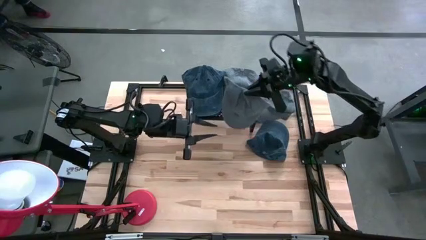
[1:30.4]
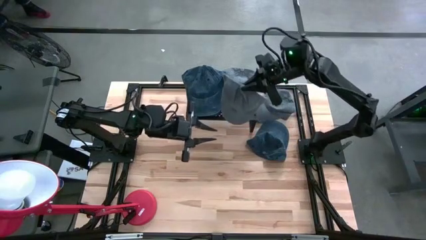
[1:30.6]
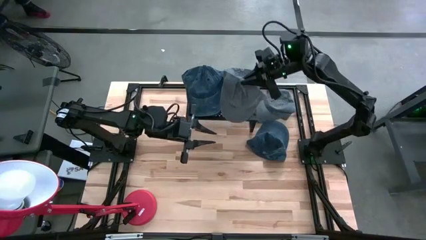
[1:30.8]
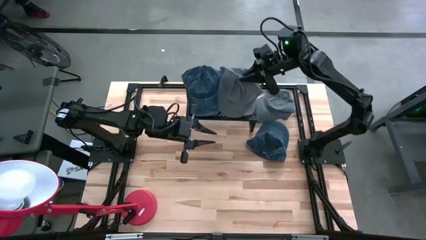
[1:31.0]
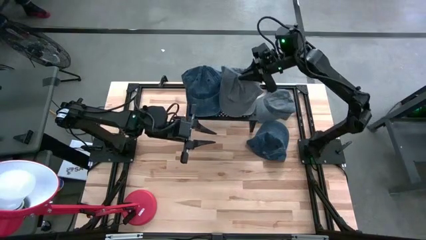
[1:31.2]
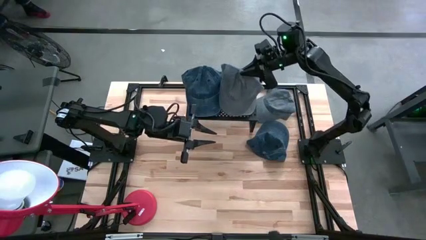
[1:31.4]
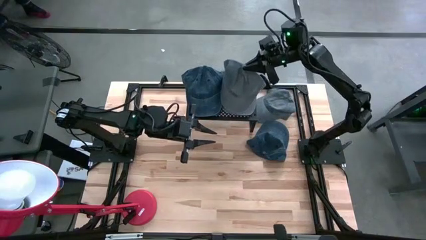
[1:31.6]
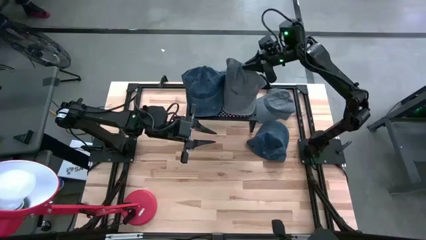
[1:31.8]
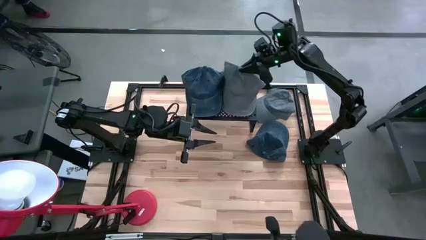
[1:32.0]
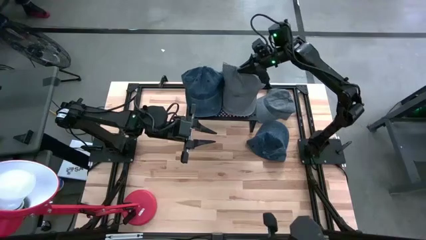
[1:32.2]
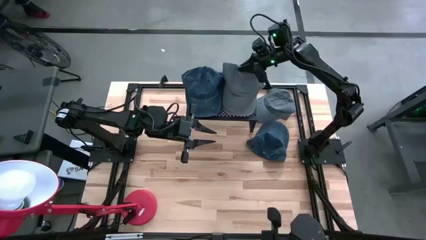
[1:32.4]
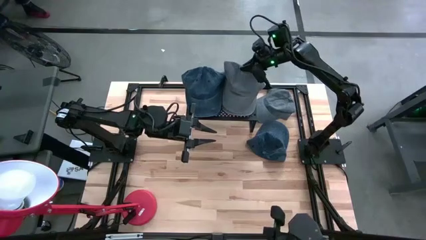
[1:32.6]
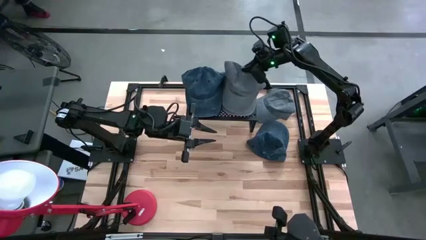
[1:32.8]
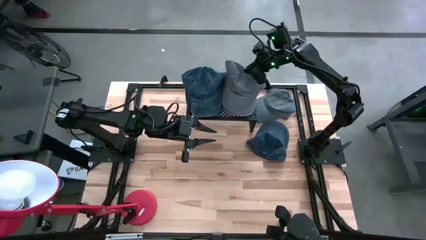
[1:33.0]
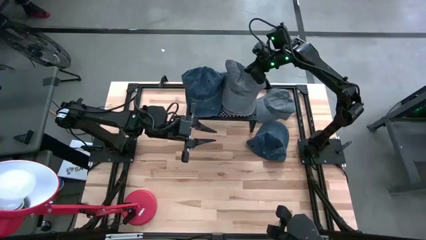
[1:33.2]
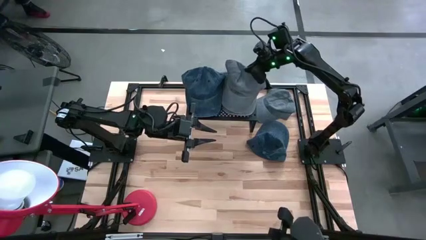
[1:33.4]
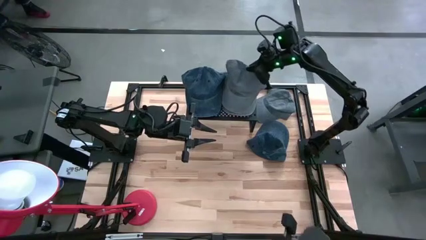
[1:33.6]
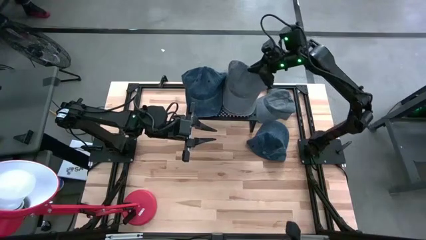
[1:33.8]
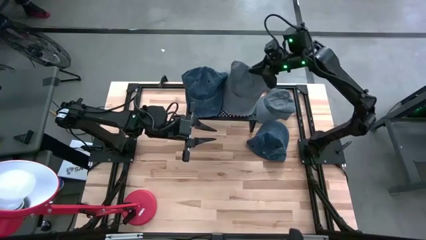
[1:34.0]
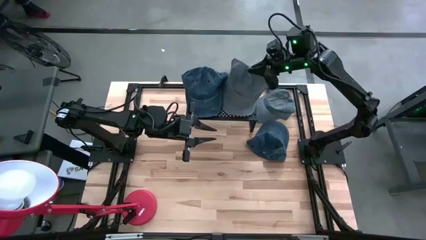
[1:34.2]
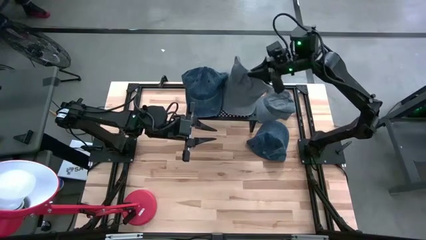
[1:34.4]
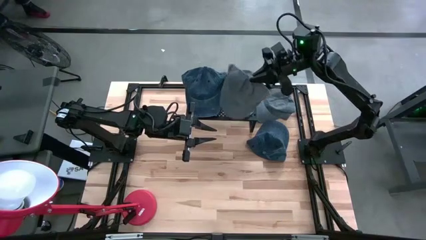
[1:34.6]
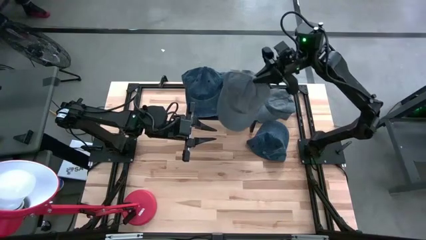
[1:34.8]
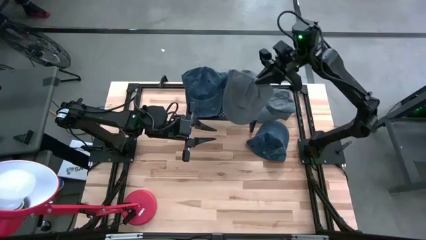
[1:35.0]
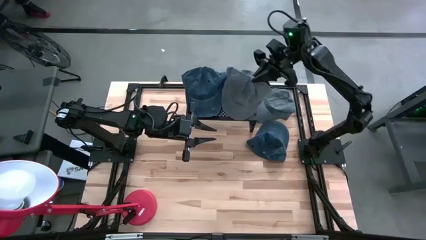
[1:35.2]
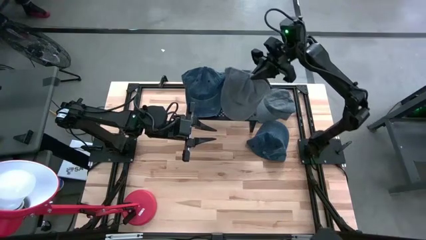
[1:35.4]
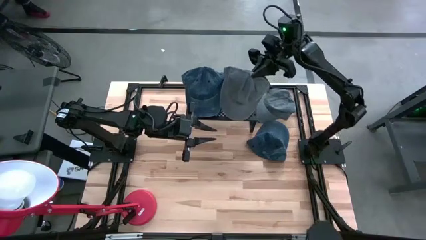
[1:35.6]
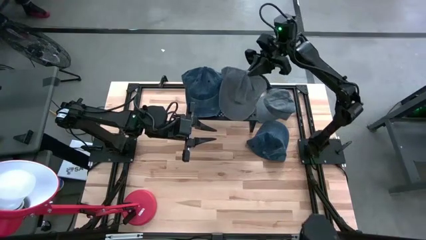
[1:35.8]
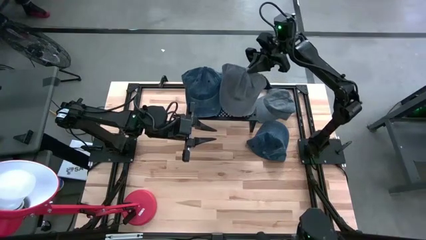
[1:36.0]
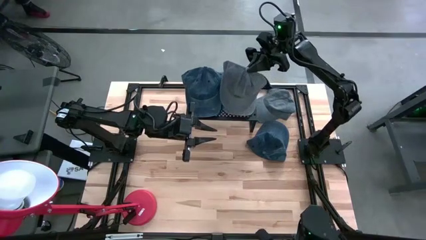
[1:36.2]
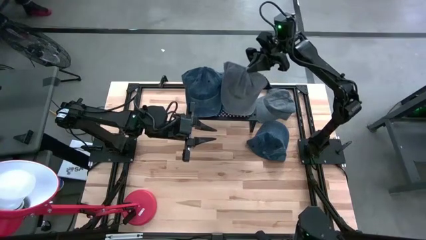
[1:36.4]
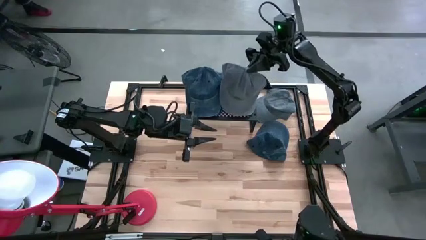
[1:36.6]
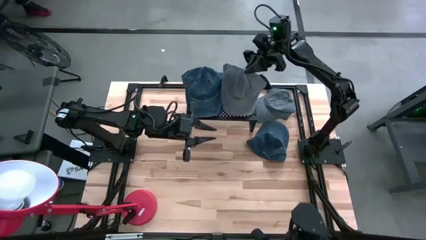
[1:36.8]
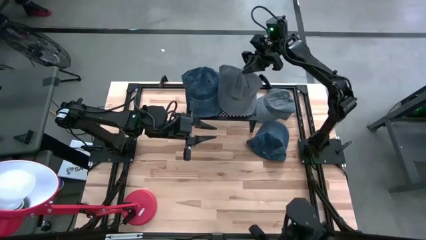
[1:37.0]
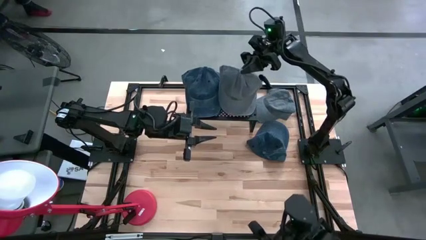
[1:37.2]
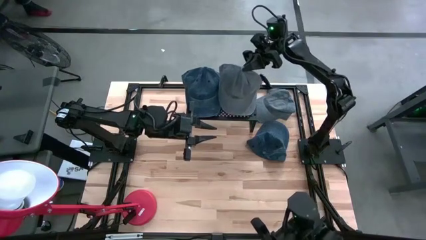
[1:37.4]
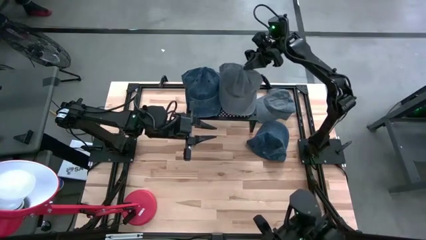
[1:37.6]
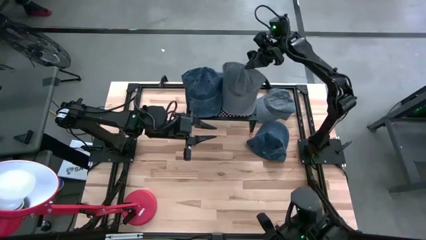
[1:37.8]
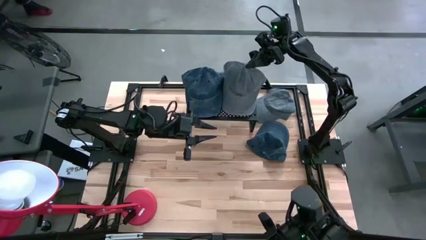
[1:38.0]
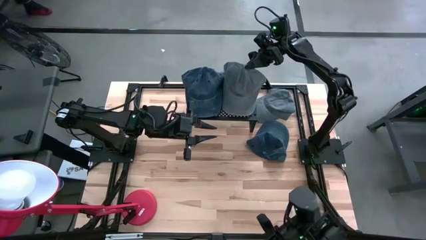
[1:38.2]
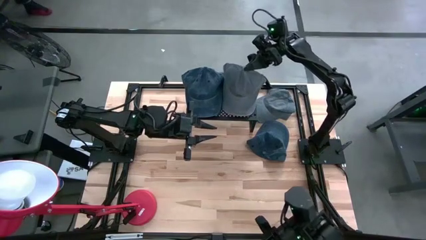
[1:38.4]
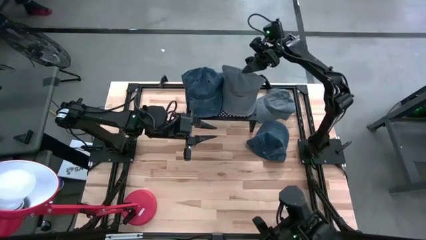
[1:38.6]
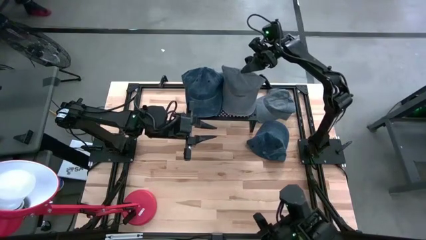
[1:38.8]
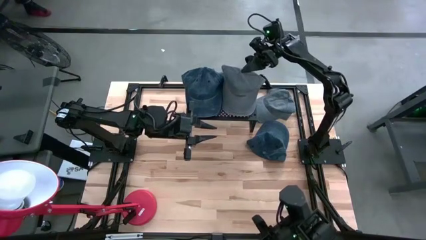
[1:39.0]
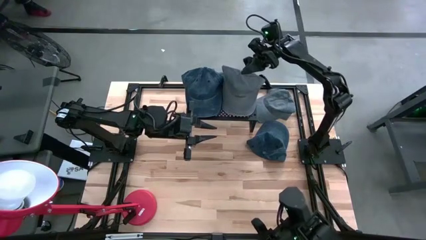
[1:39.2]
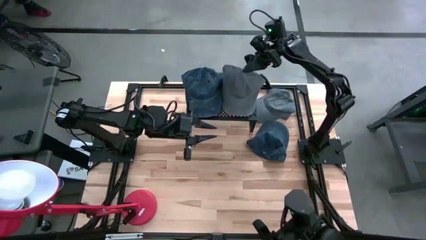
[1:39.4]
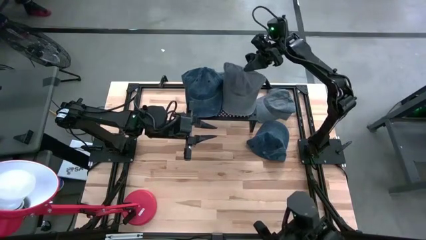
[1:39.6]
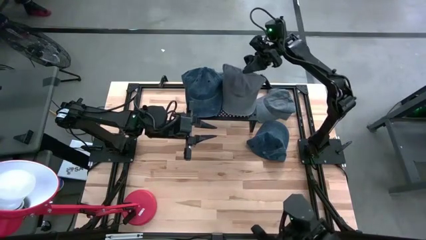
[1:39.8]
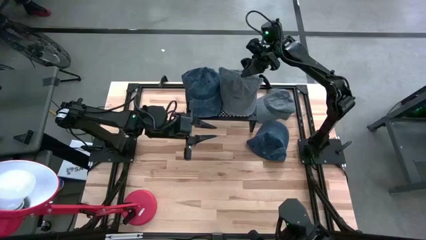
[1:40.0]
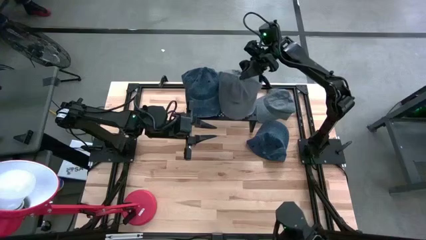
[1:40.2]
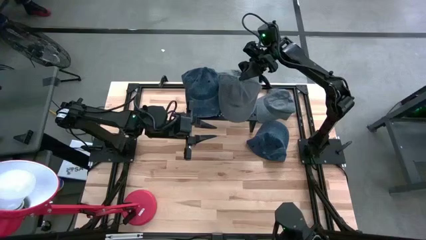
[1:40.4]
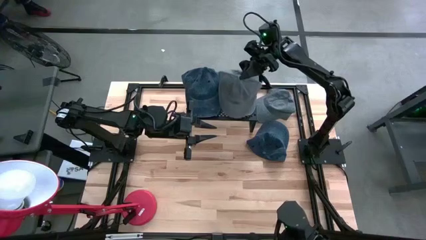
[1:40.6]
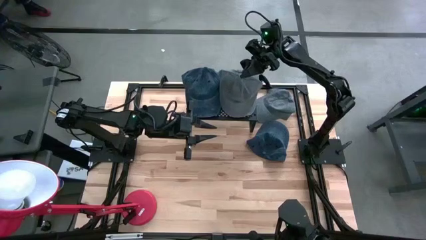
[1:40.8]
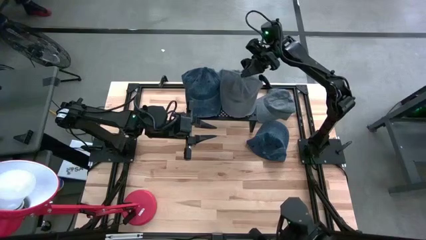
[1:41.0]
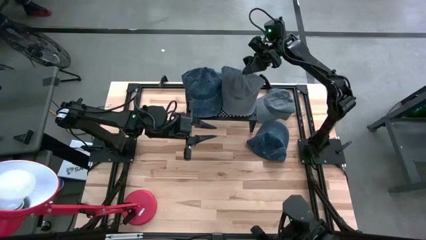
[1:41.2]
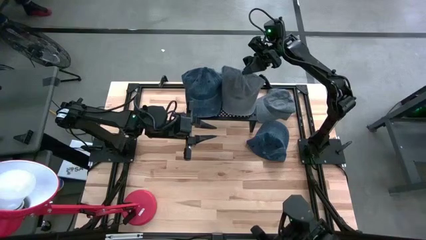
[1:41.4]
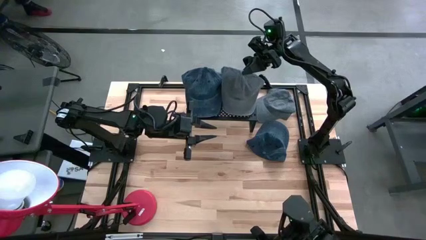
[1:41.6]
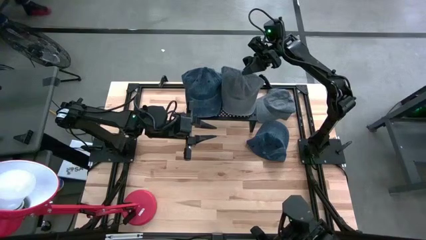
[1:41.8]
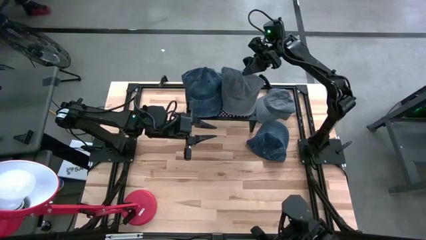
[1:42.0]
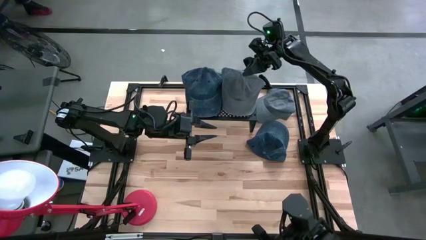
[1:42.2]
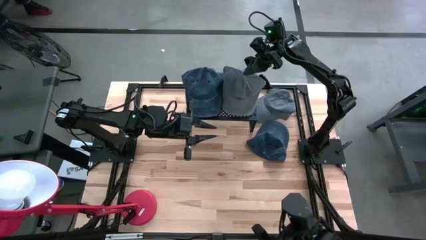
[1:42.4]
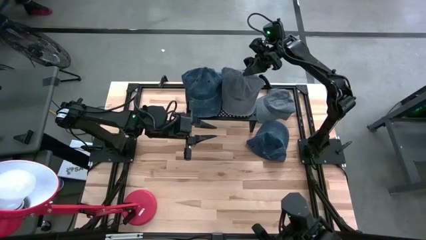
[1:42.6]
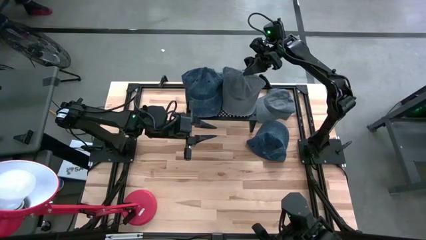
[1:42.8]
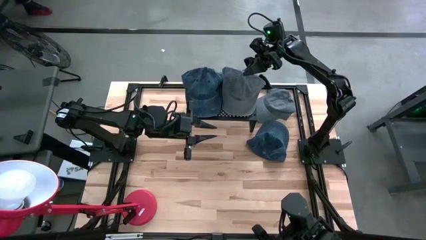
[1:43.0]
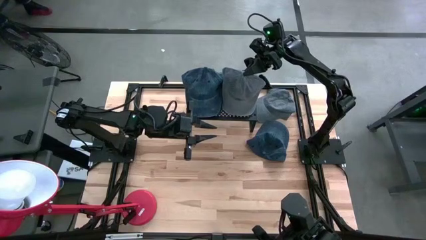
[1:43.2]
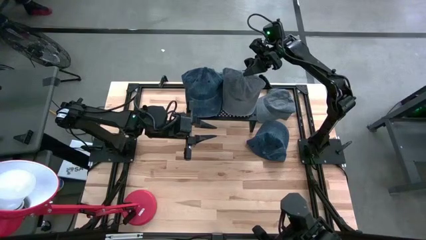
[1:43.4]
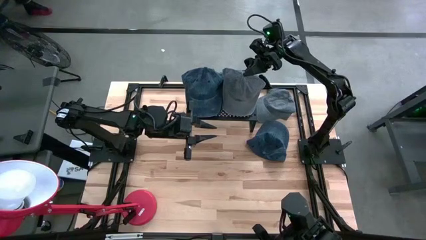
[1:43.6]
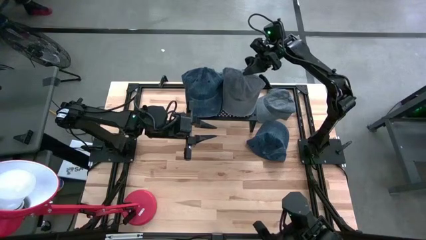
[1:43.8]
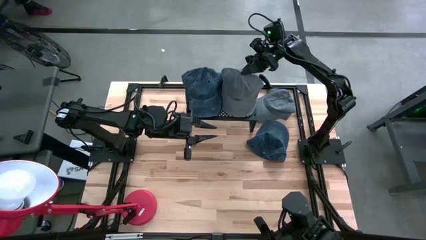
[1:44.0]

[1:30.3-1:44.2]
Task: Pick & Place hat
Stack the bottom gray cap on top of the gray cap on the shelf

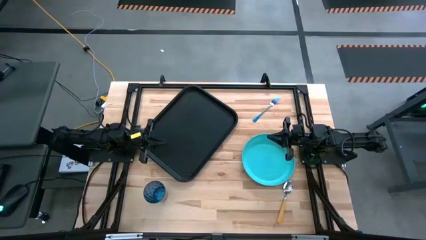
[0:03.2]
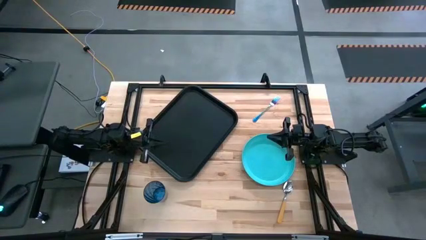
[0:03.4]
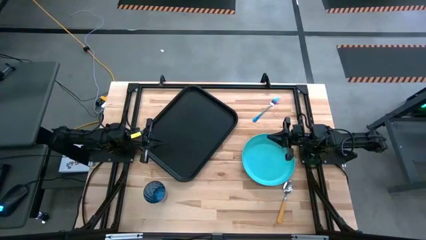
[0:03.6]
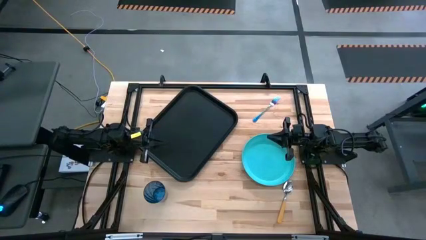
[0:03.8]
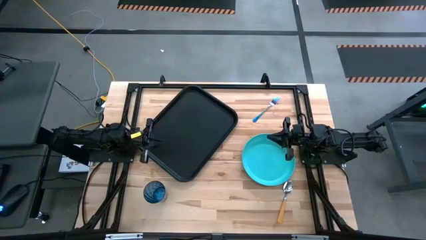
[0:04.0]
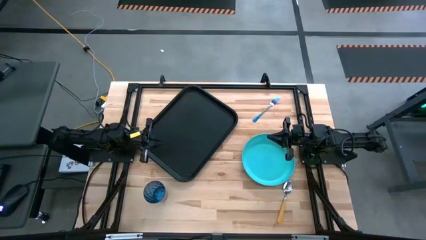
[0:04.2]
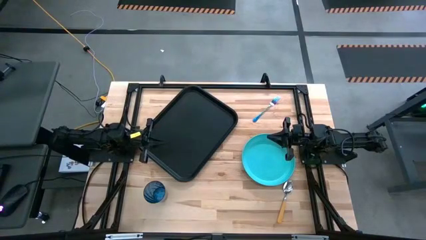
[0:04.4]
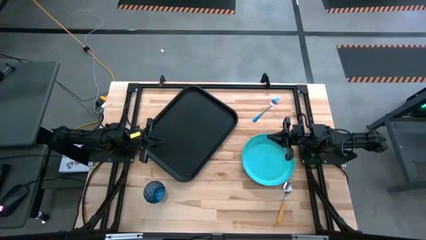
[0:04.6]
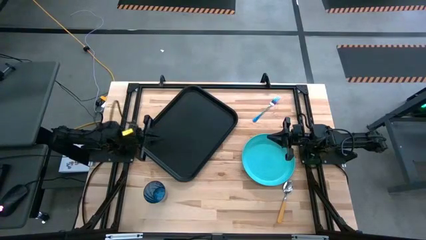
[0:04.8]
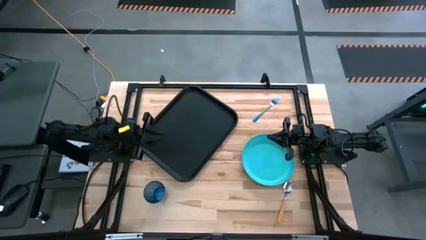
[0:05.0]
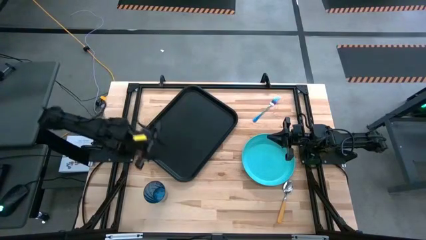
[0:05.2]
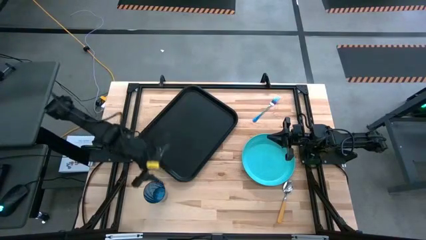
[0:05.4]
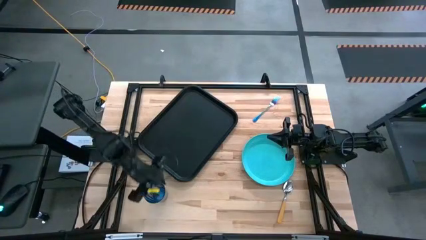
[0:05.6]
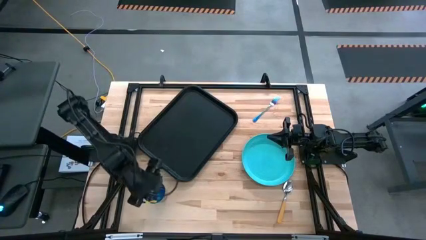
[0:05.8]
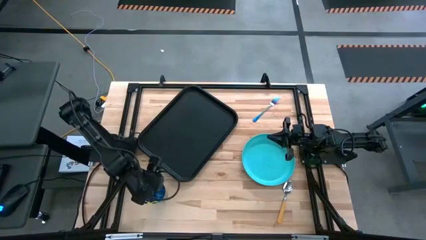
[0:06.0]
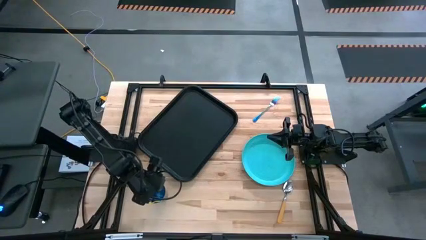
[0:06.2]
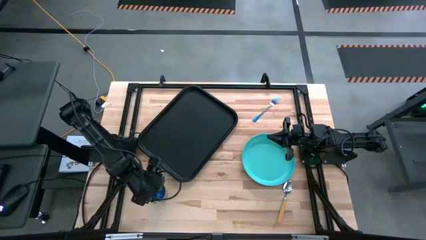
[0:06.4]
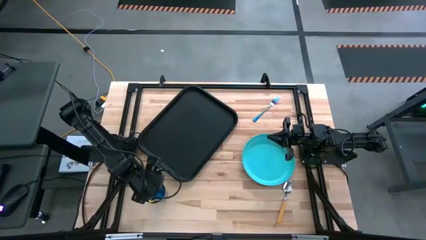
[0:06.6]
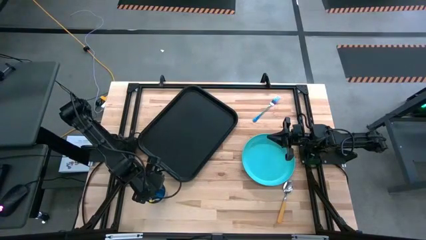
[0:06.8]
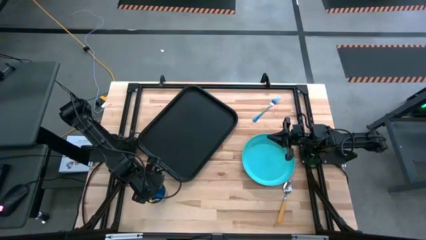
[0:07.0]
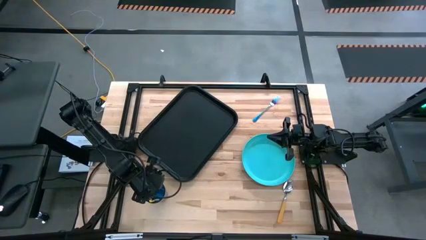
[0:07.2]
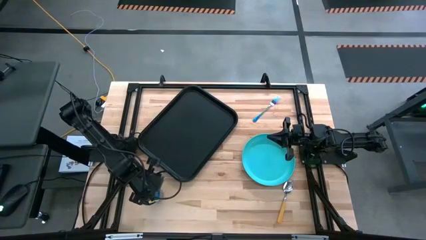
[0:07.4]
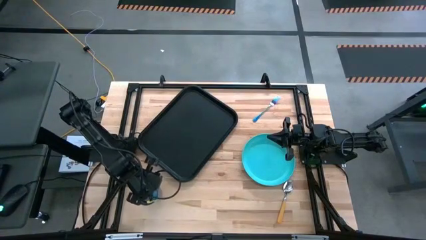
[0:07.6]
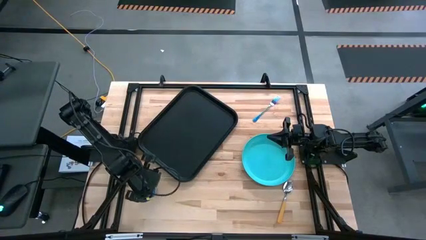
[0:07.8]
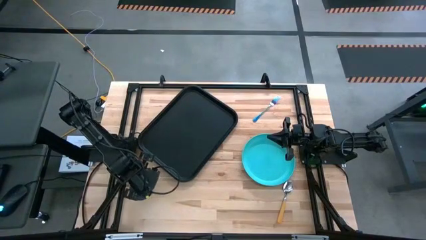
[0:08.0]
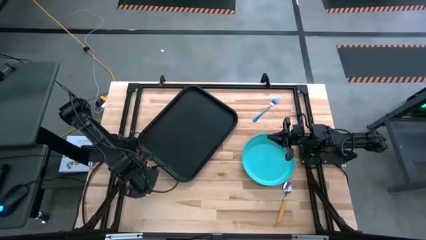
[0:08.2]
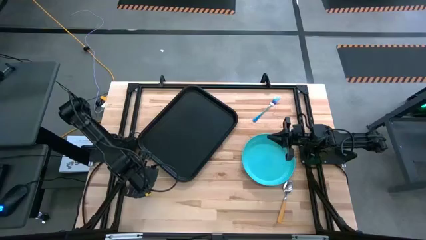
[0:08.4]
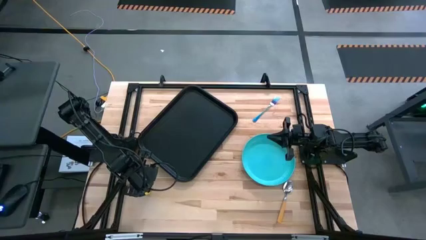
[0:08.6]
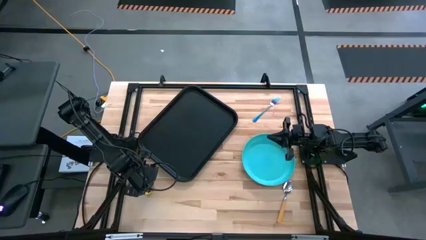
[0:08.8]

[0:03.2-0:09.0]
Task: Pick and place plate/cup/fork/spoon on tray
Adjust the blue glass
